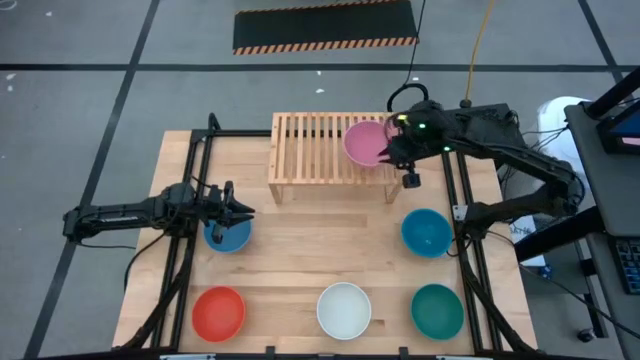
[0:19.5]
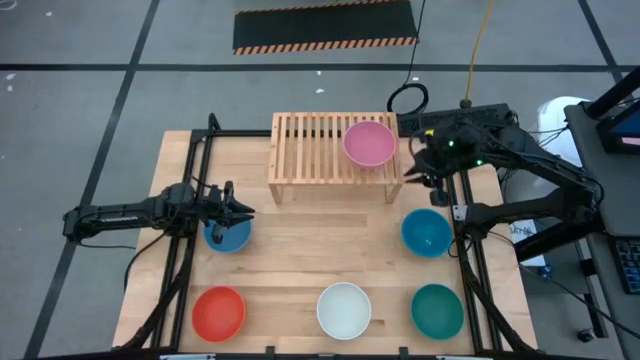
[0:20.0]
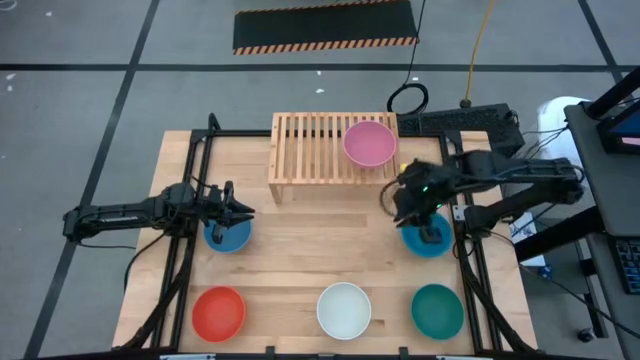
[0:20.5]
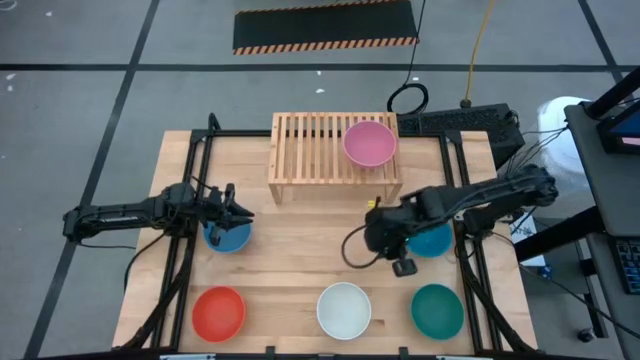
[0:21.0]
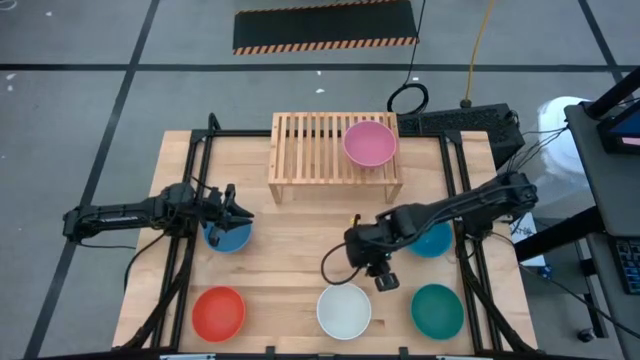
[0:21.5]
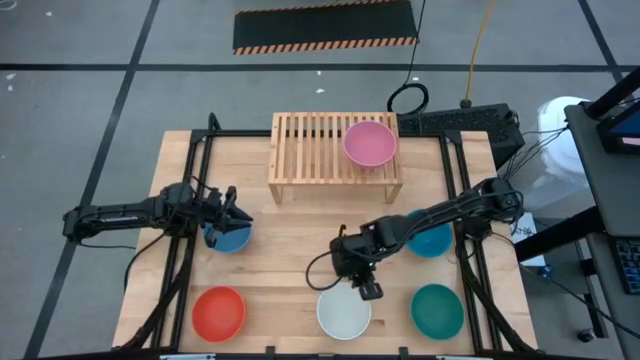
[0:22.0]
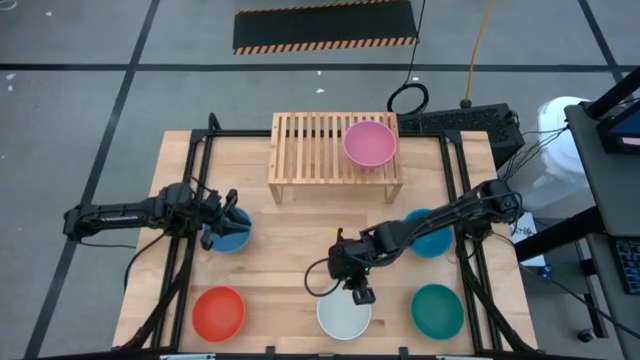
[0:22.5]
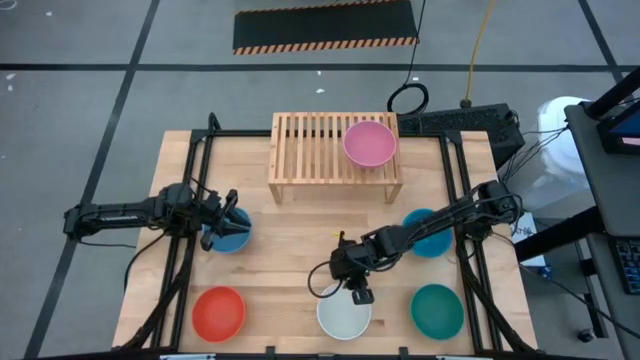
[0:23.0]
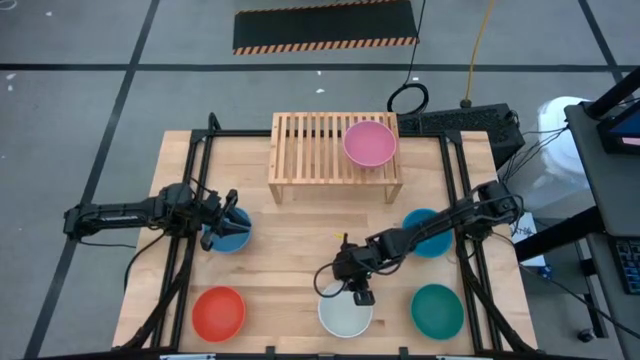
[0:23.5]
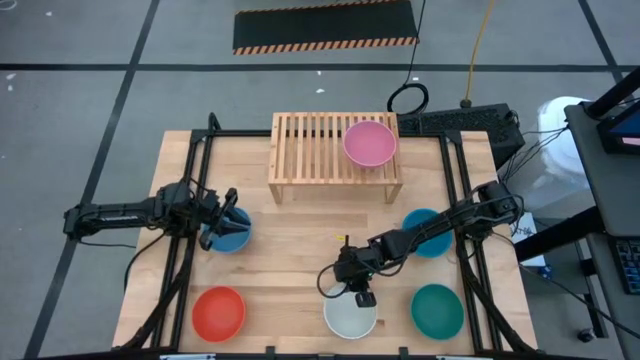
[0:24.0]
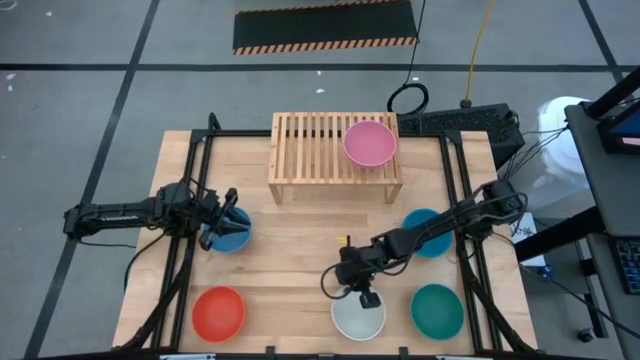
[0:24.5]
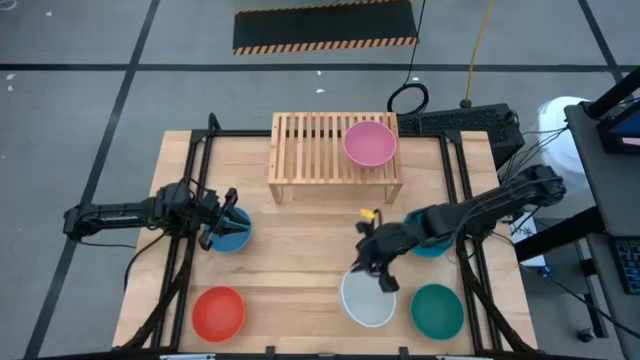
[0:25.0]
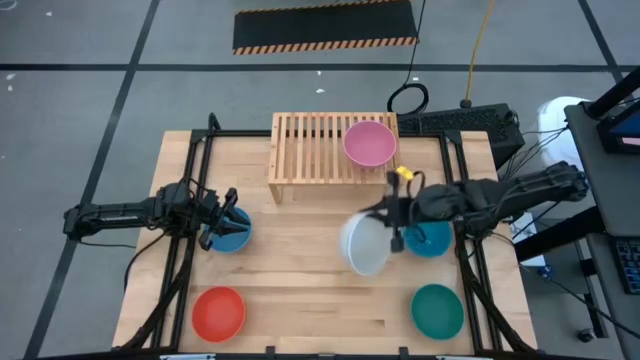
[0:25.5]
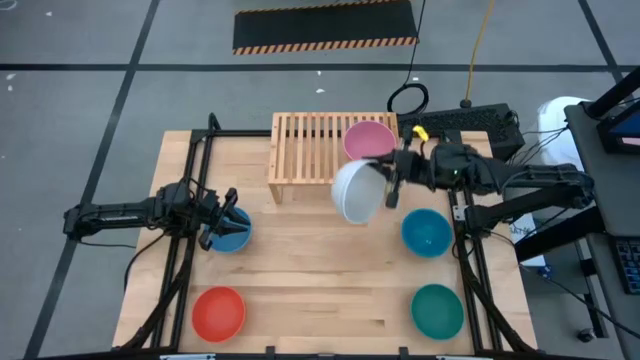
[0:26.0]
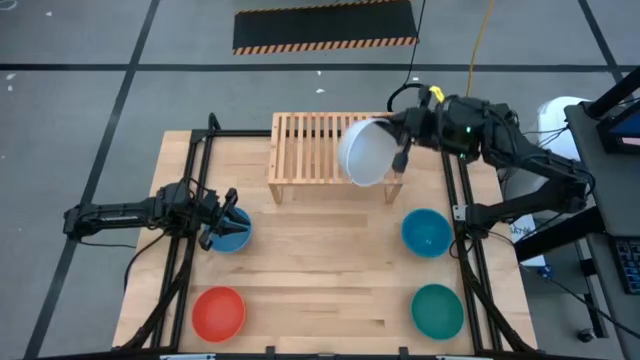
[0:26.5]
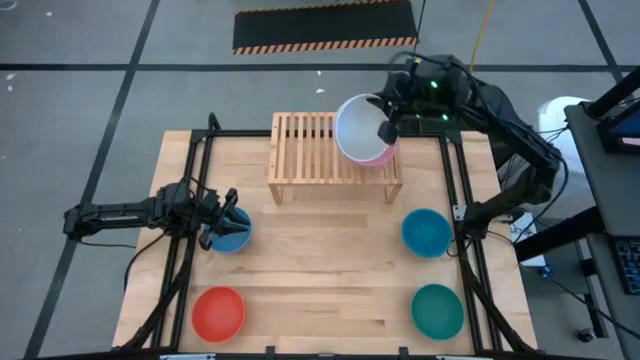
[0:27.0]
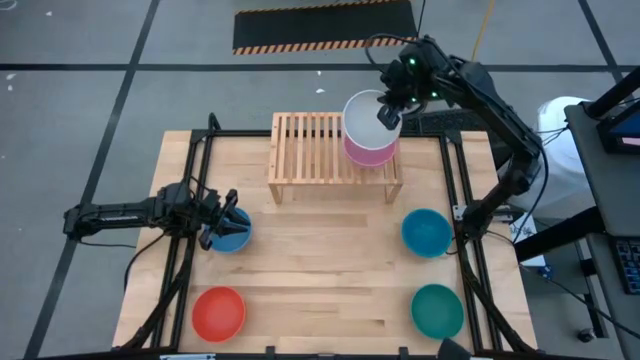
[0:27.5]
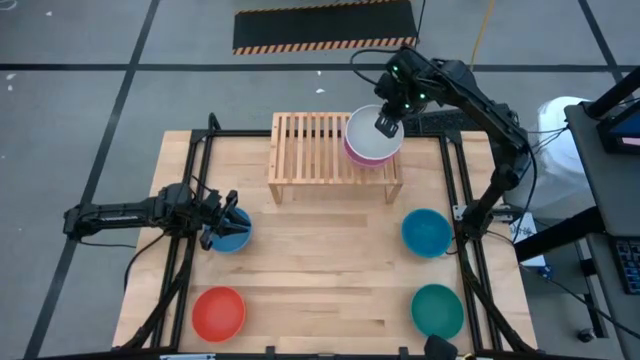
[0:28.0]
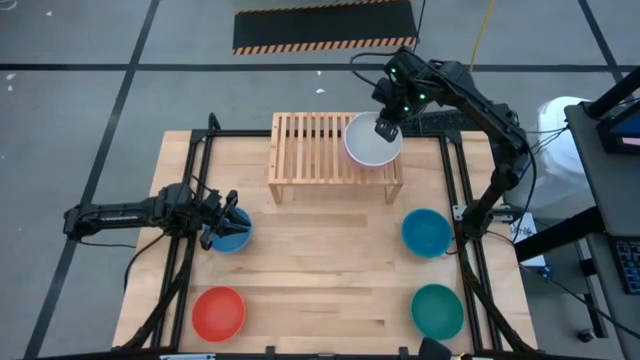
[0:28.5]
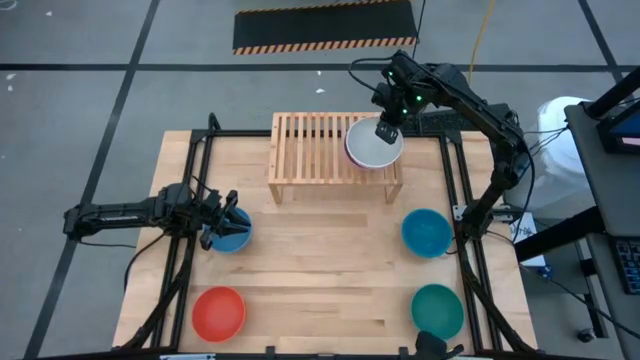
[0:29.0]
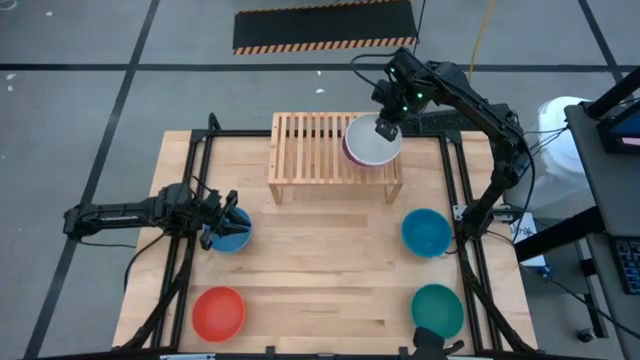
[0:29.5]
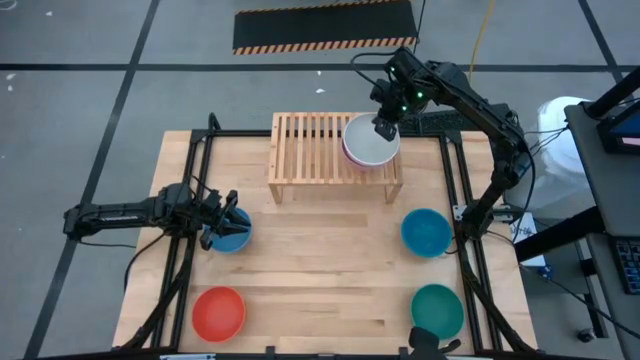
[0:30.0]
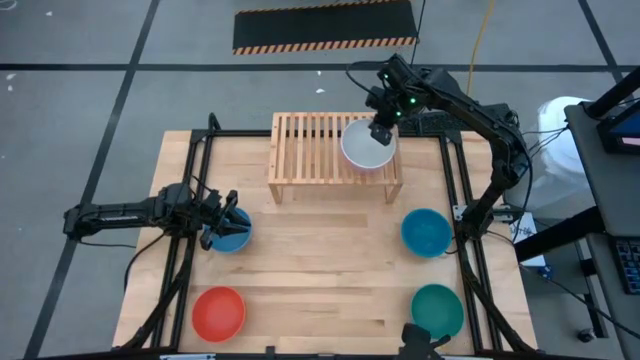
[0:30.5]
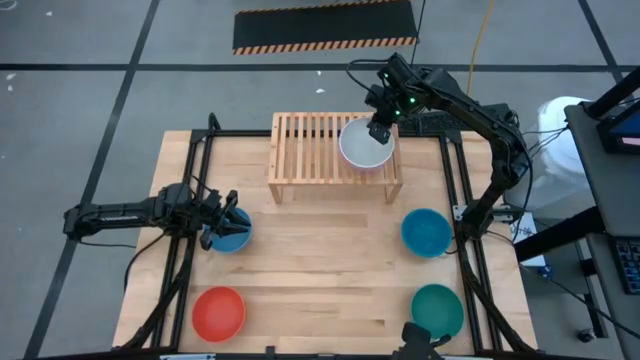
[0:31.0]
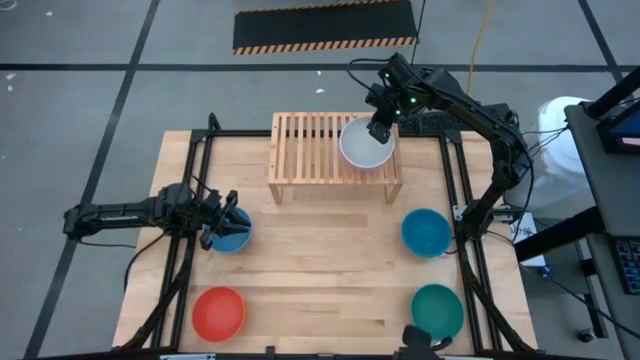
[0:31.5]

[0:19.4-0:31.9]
Task: Place and stack bowls onto a shelf
Stack the white bowl on top of the pink bowl on the shelf
